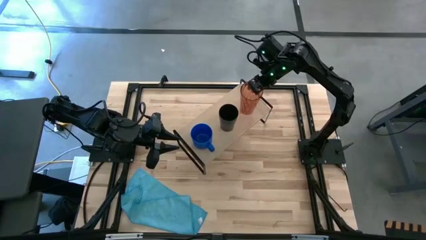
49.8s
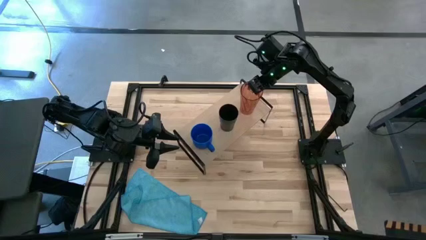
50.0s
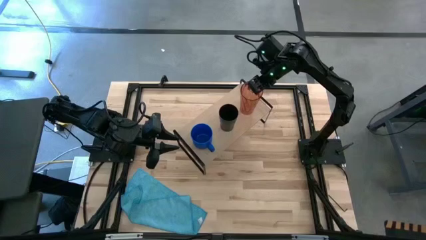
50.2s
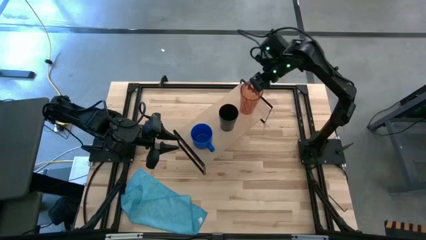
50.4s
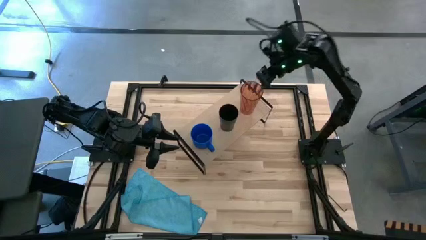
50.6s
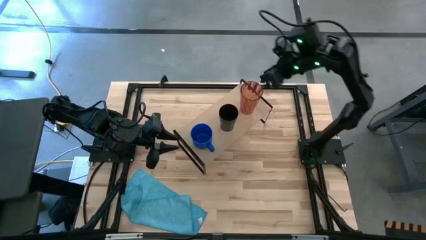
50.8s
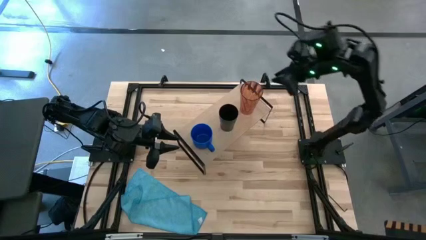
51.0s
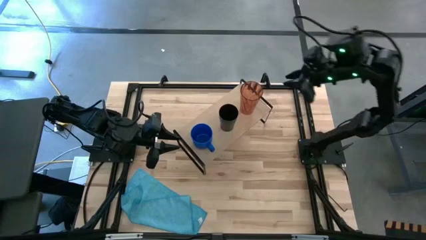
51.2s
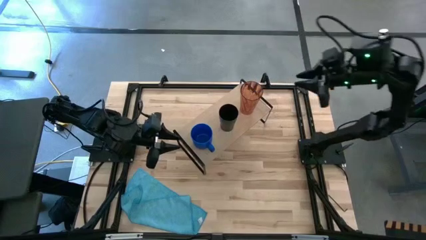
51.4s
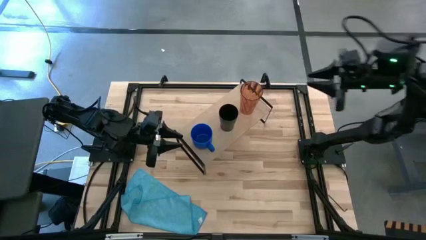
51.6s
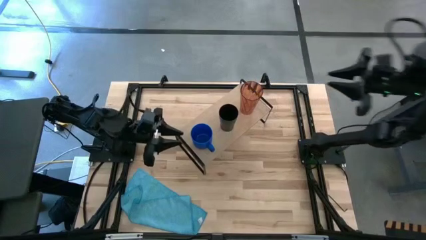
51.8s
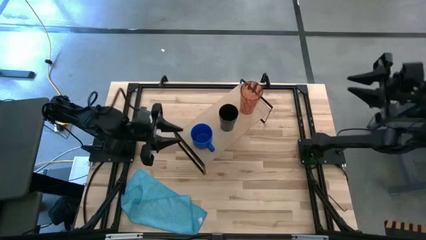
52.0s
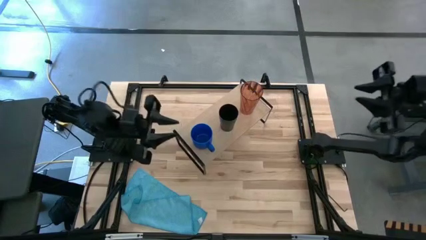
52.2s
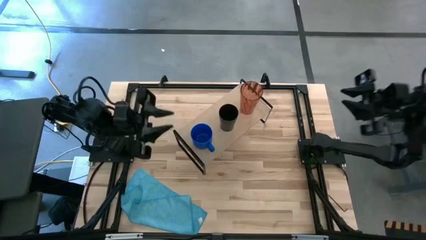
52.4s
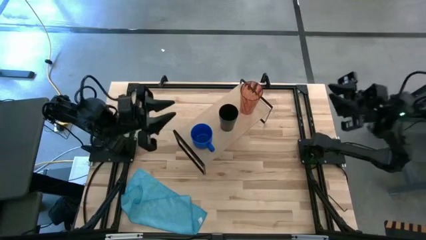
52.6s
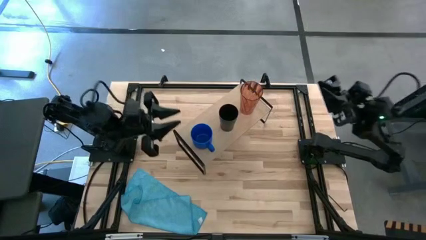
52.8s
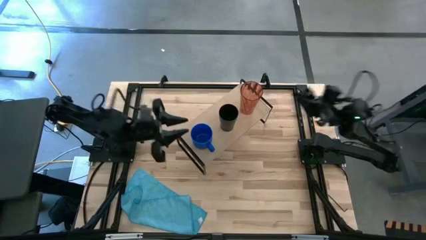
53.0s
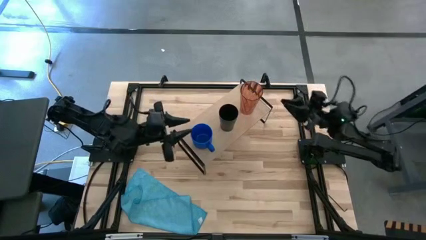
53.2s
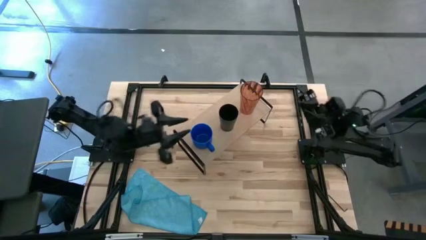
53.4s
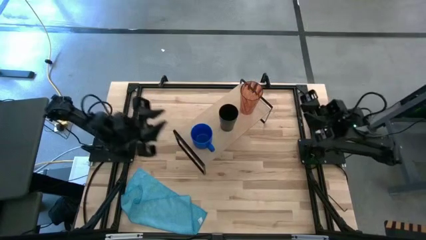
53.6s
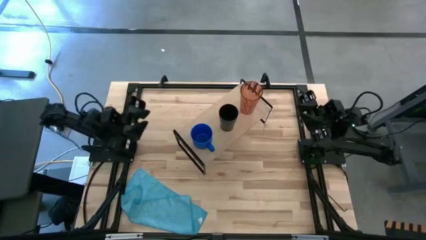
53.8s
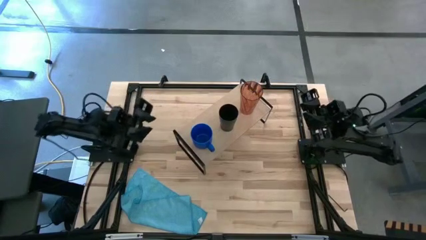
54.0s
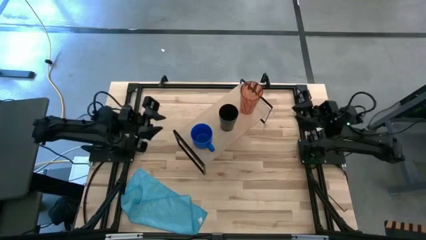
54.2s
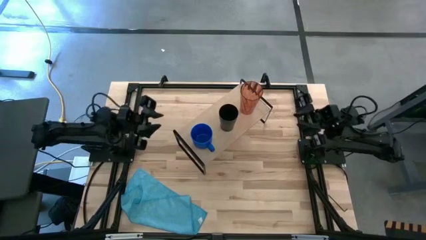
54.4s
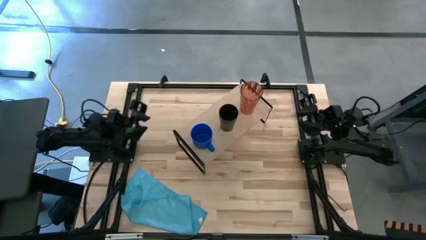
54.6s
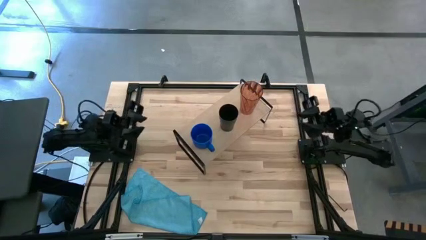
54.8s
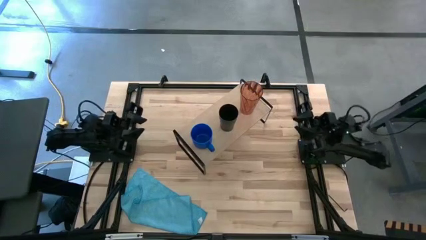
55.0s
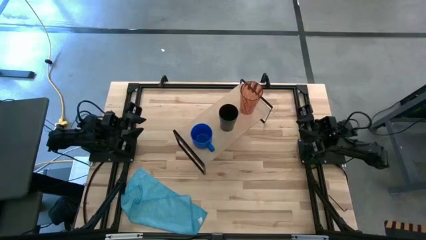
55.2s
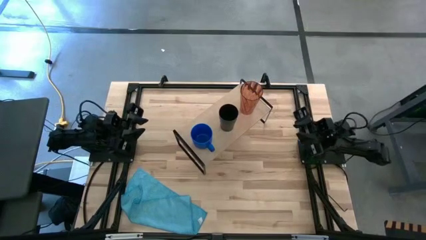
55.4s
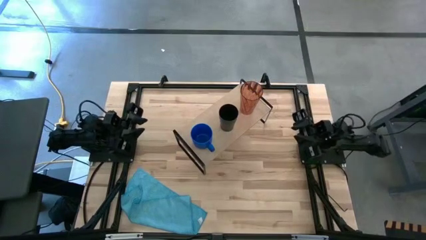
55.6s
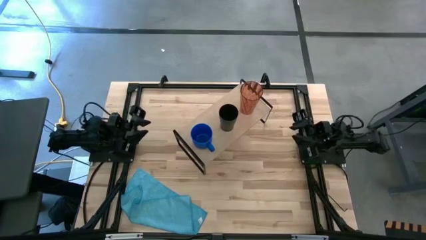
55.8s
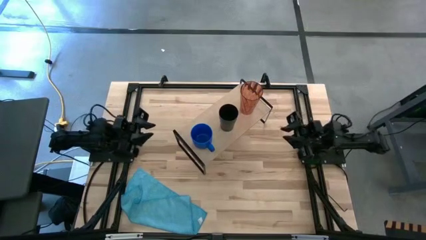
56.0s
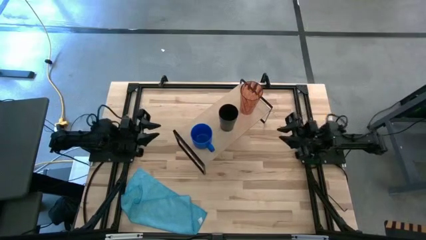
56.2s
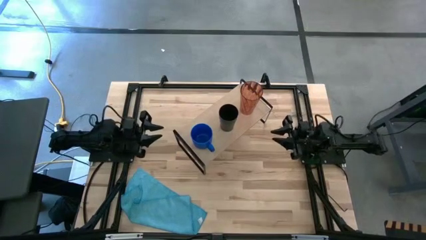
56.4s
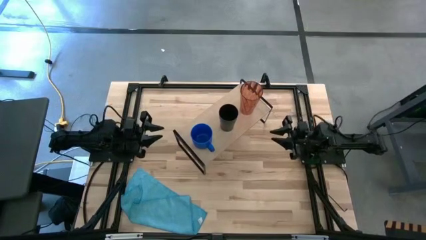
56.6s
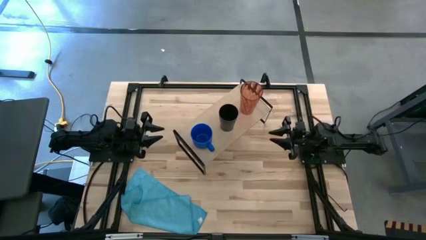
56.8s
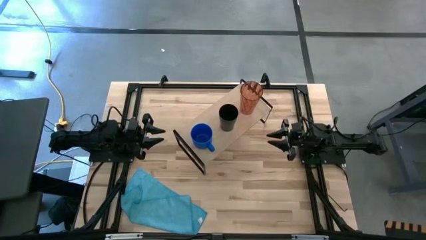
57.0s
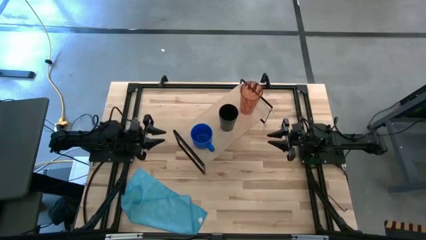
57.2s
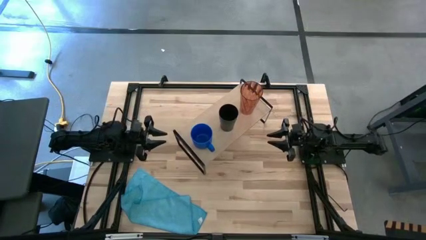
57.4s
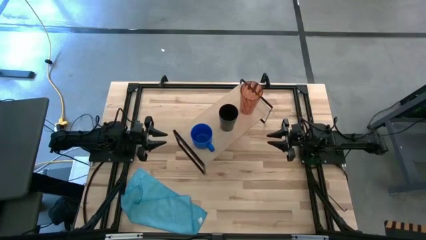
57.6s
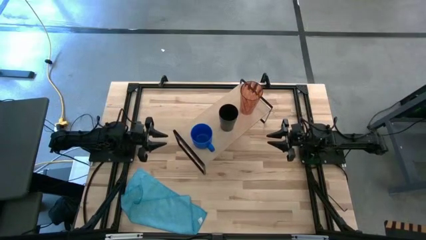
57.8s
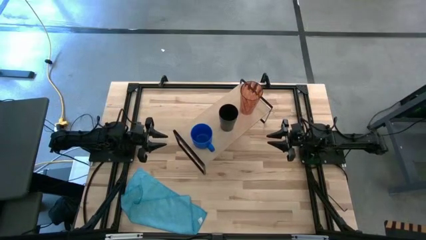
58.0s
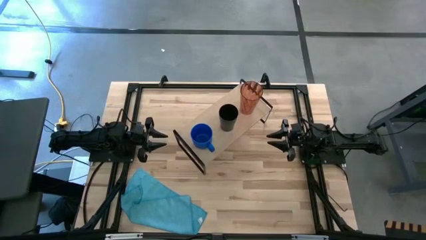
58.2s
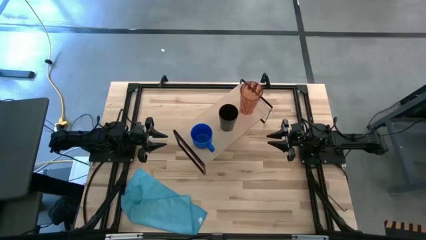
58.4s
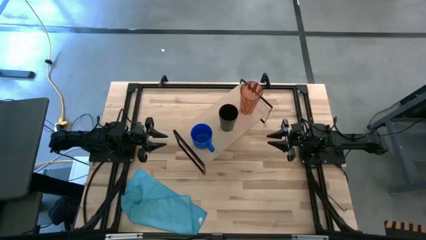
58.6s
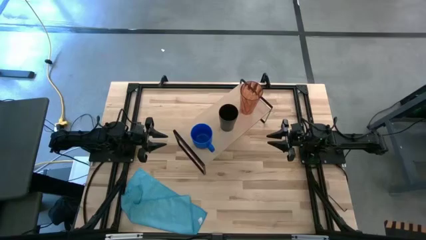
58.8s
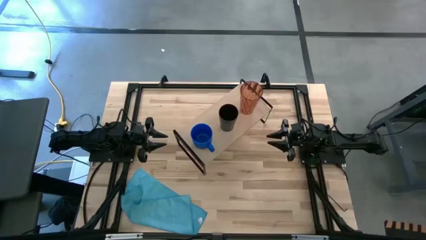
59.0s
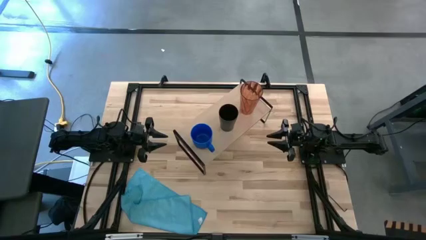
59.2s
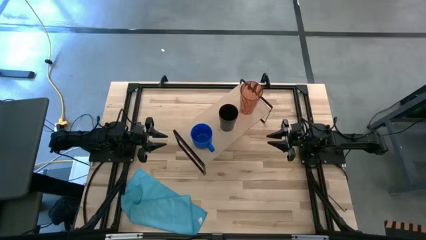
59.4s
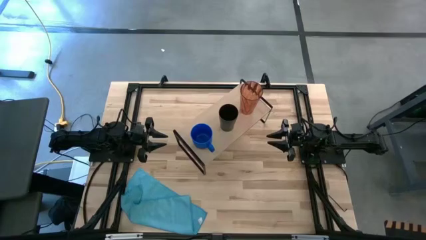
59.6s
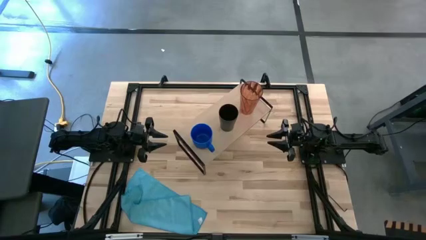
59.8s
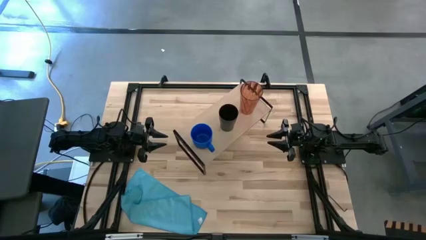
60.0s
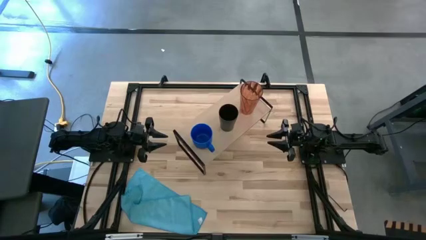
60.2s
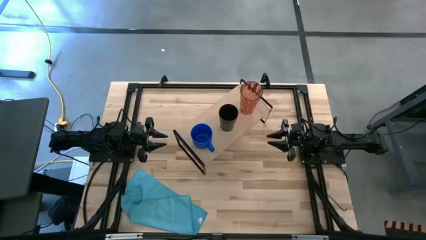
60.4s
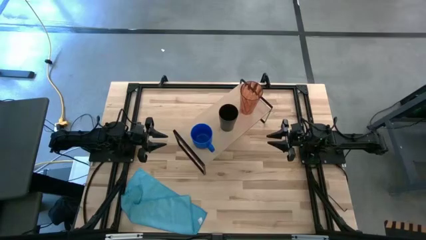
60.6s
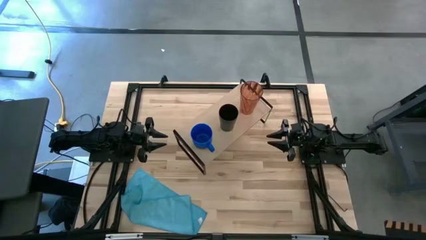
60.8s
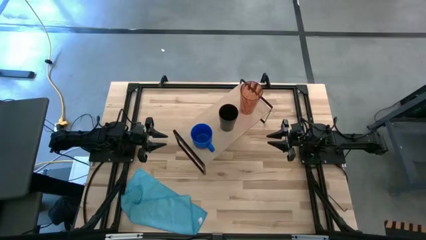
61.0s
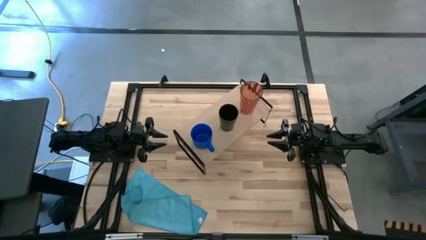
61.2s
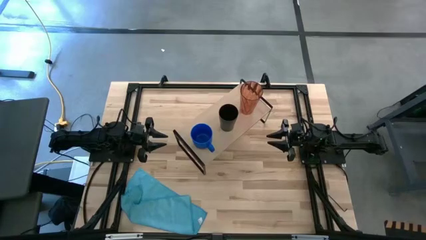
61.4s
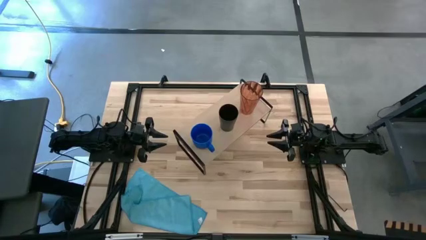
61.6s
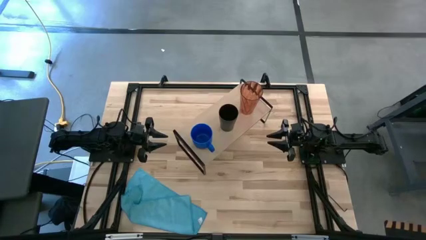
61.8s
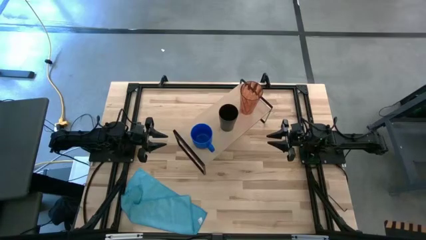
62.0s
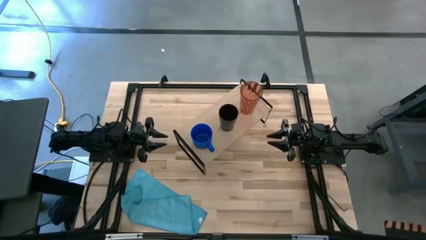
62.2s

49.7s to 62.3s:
Task: Stack small to large cups/mugs on shelf
Return to Home Position
